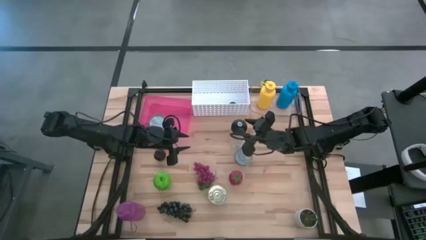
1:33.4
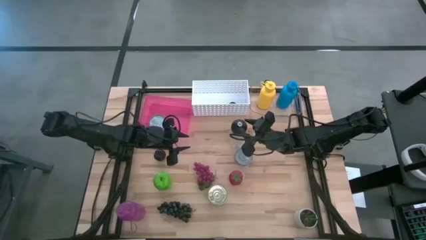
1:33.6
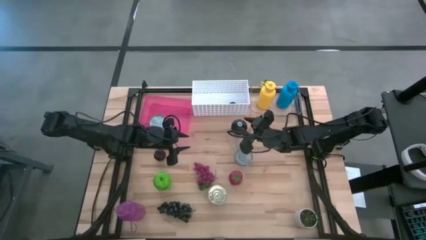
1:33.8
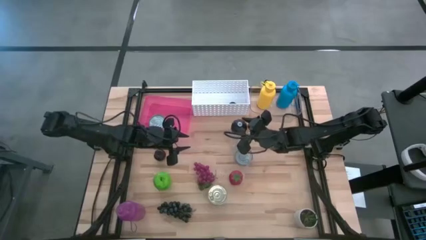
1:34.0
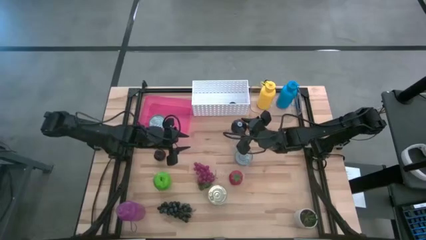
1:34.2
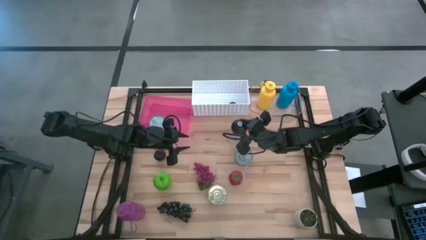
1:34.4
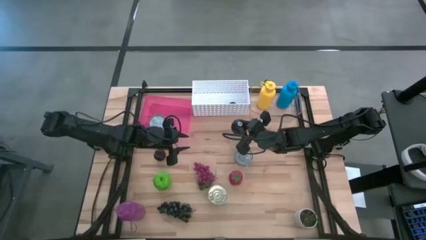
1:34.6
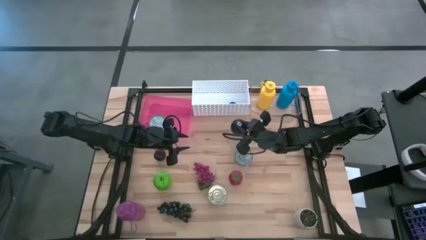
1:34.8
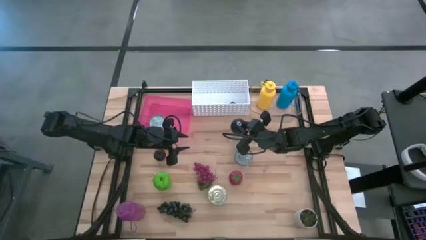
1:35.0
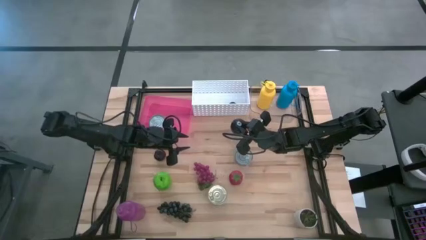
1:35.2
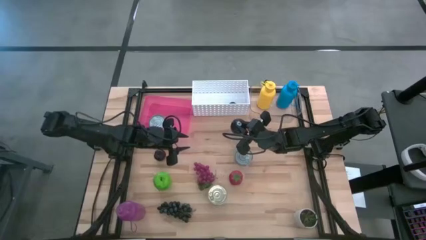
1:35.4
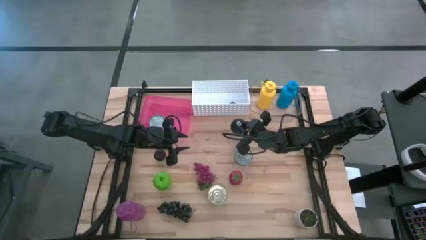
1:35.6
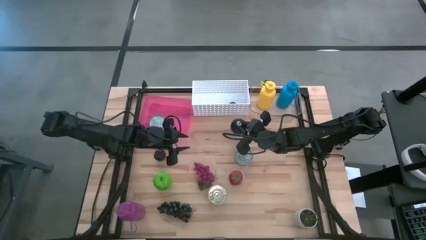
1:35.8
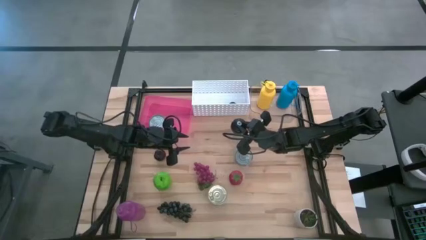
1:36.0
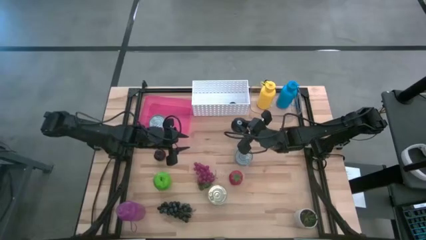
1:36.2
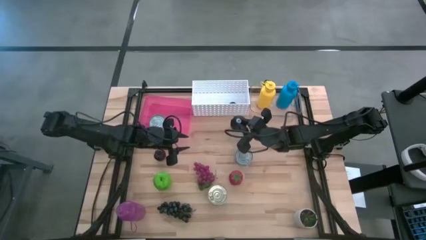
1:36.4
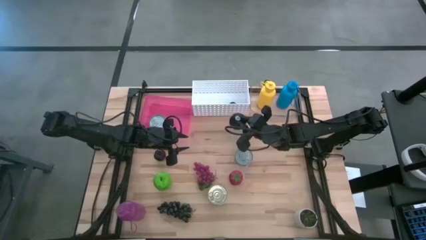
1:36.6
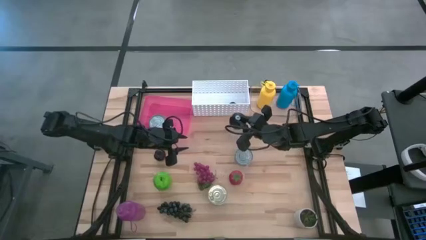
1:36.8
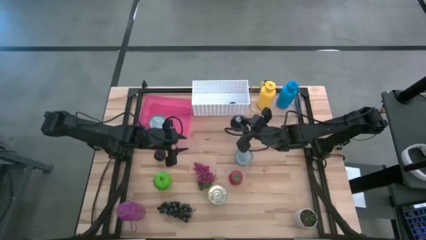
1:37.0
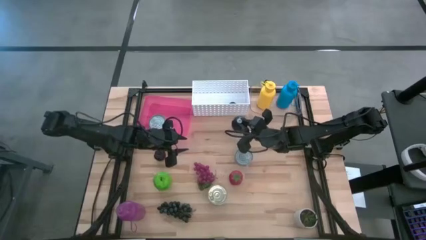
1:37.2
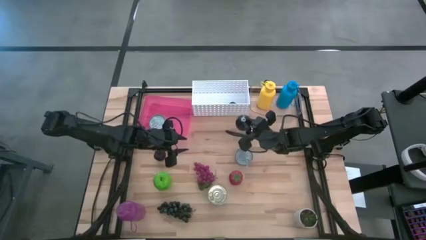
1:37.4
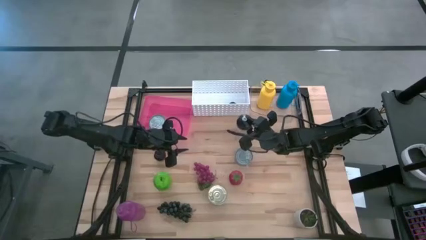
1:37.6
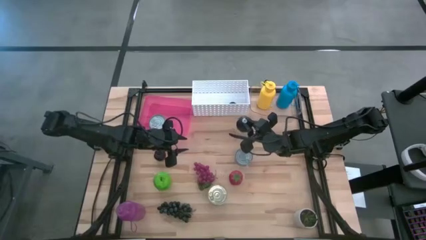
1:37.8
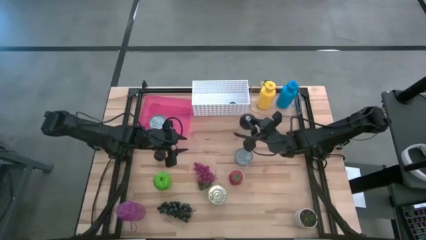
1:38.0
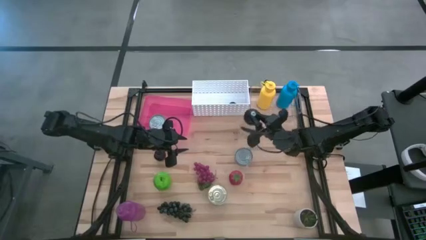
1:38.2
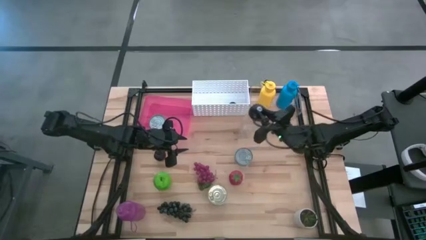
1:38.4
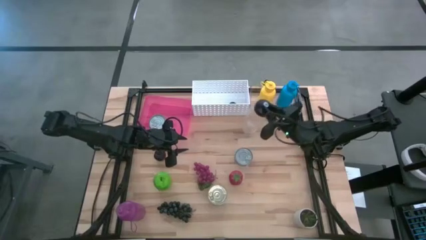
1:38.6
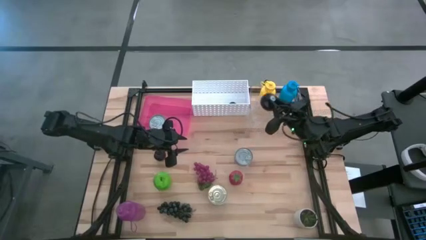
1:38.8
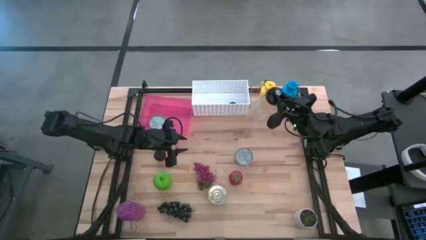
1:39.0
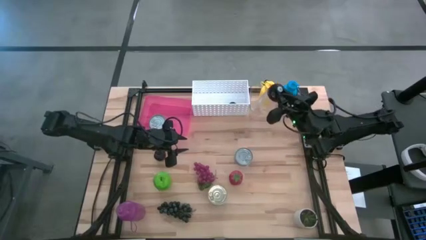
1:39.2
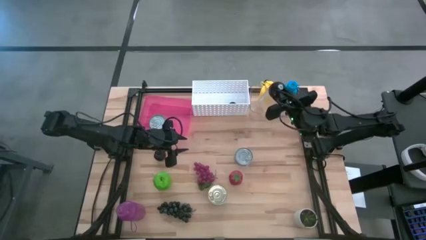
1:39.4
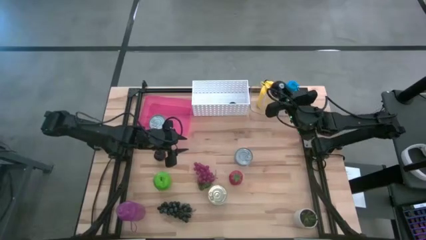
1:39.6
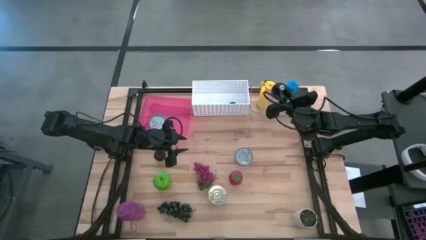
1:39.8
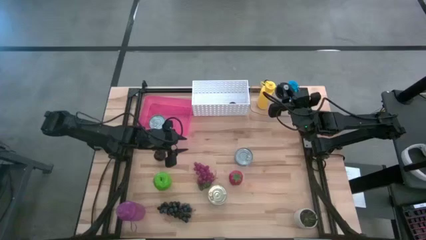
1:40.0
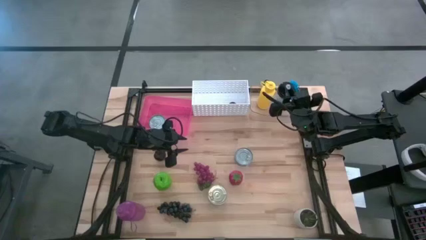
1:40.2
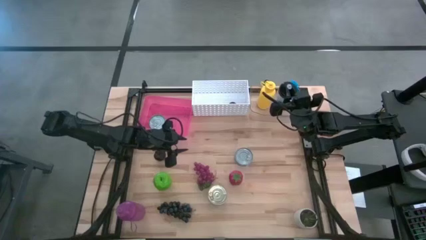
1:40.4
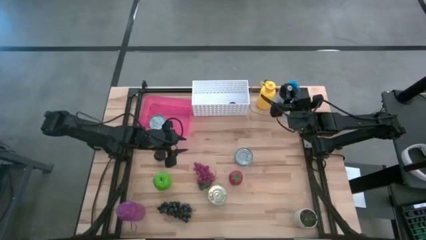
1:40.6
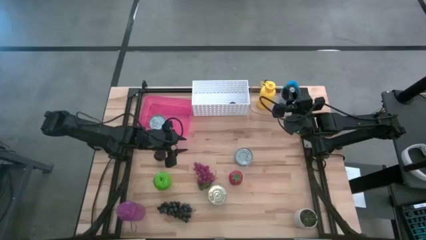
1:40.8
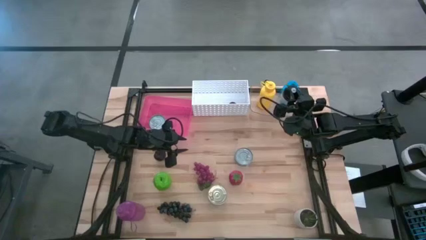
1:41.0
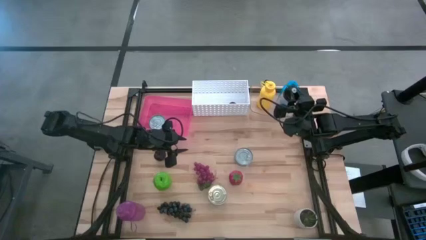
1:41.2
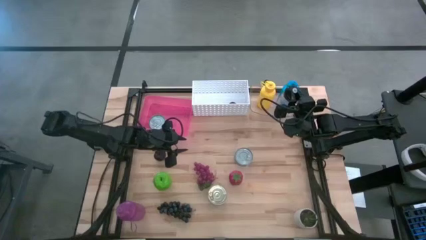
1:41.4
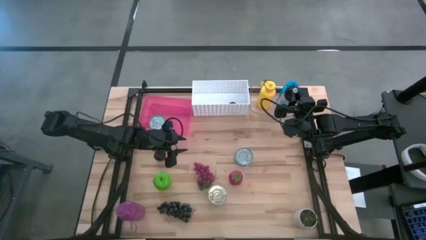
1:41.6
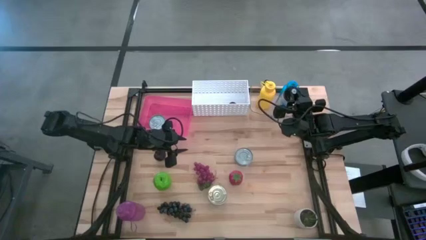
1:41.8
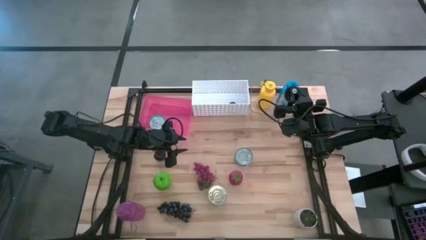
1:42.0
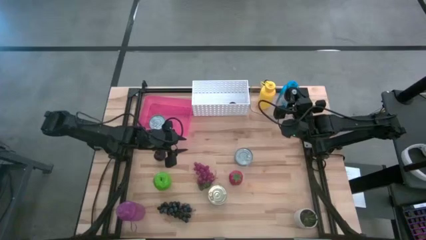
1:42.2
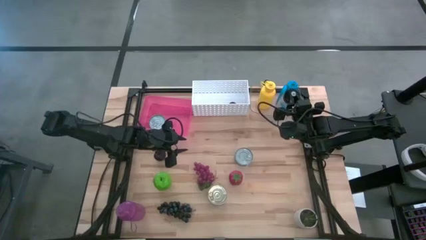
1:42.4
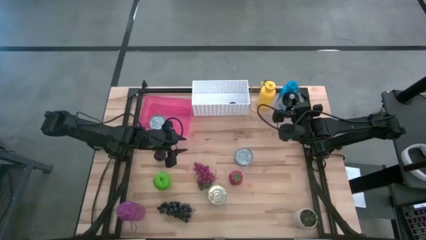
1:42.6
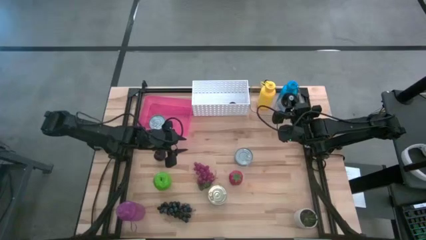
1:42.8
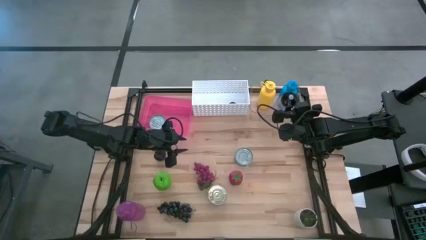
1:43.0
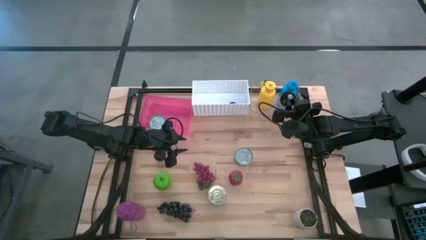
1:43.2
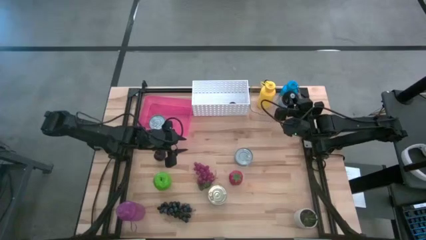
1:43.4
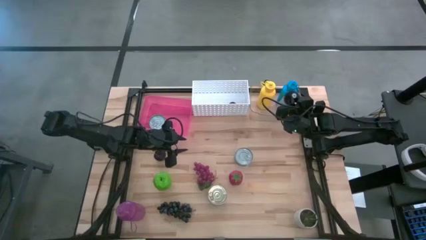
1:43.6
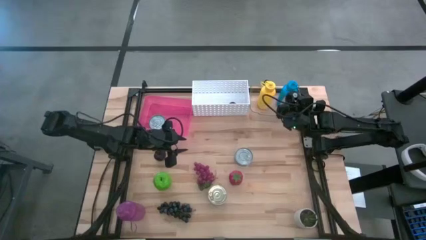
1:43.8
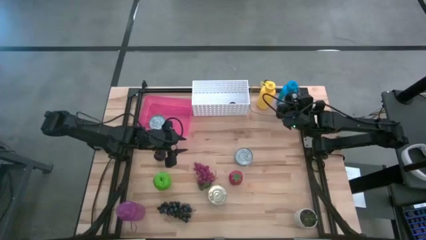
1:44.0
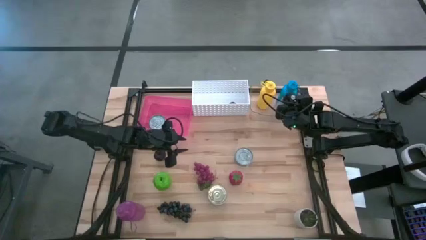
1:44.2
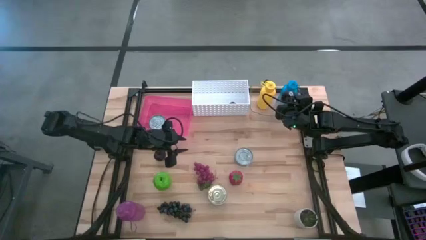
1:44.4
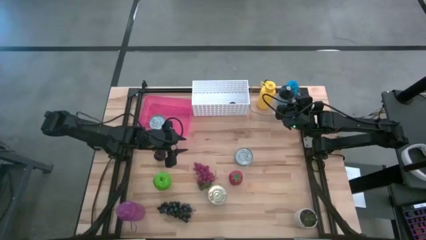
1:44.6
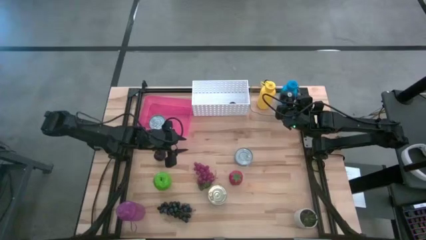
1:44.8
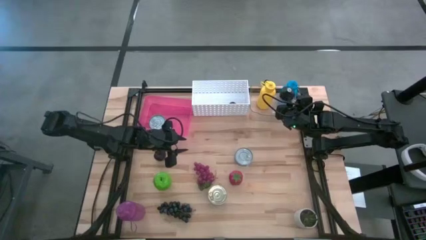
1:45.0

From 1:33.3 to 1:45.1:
Task: Pick & Place Food Item
Put the transparent water bottle into the transparent bin

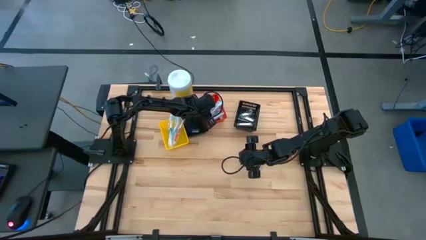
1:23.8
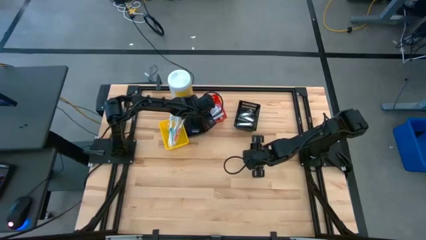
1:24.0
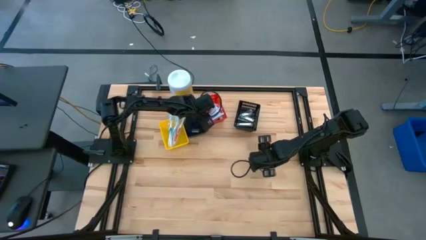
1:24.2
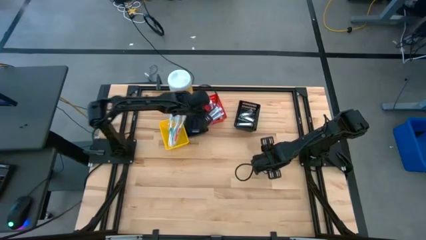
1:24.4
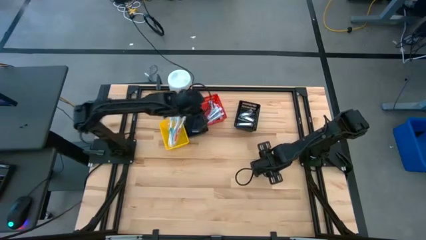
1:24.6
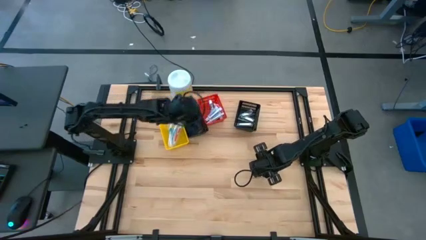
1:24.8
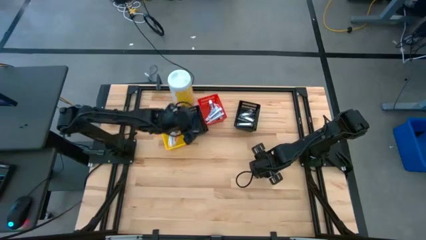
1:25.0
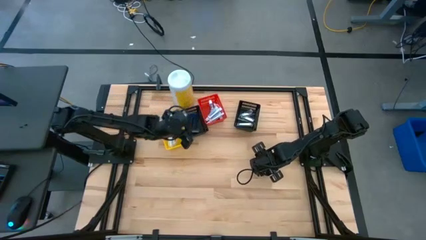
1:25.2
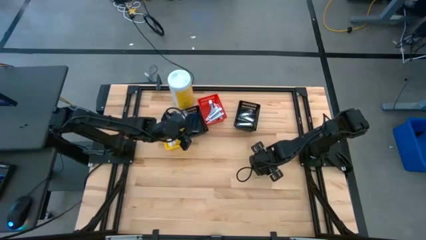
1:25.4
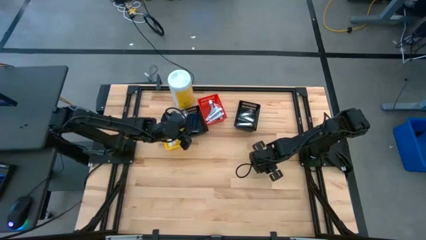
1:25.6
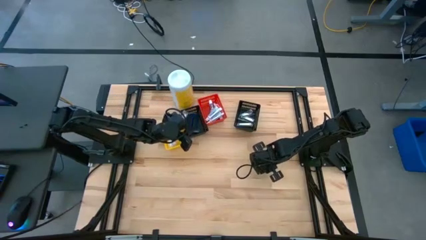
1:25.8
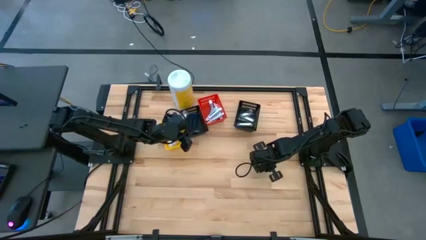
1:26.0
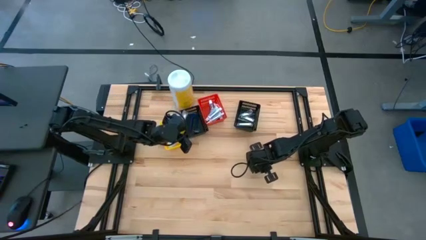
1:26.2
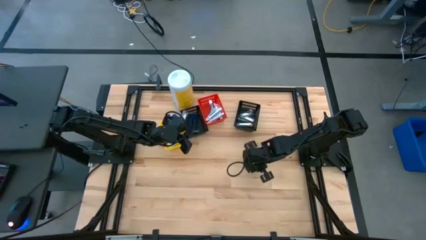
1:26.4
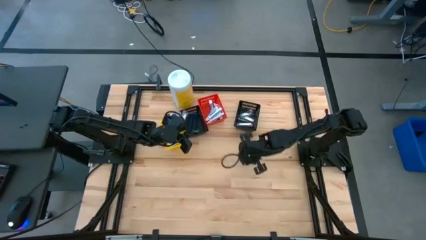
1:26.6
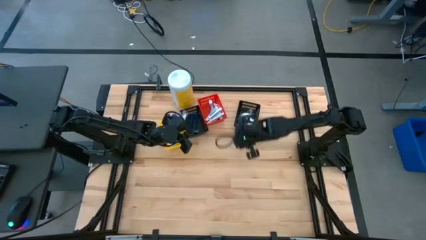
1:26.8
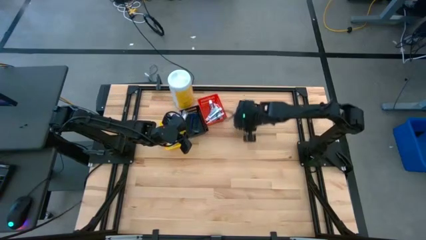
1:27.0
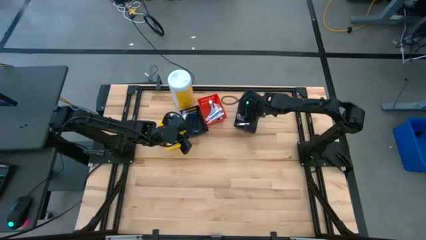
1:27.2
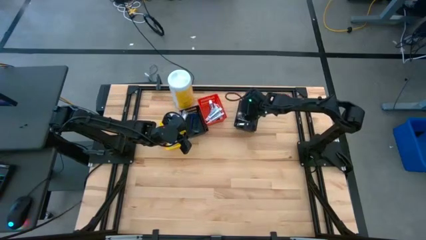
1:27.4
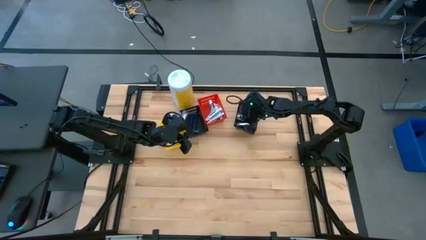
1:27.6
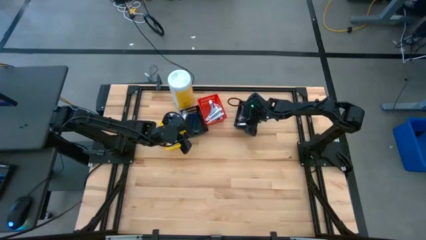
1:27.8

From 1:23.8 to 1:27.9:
Task: Pick & Place Travel size toiletries
Put the silver nail cutter into the right black bin
